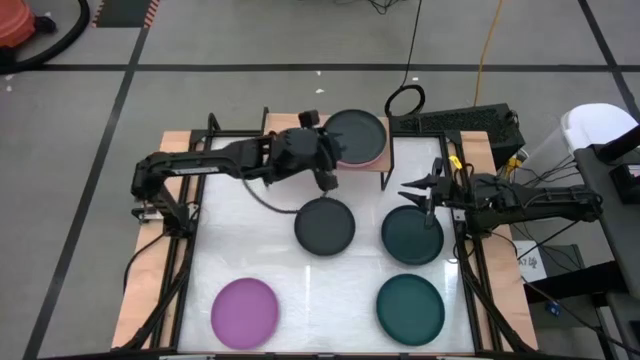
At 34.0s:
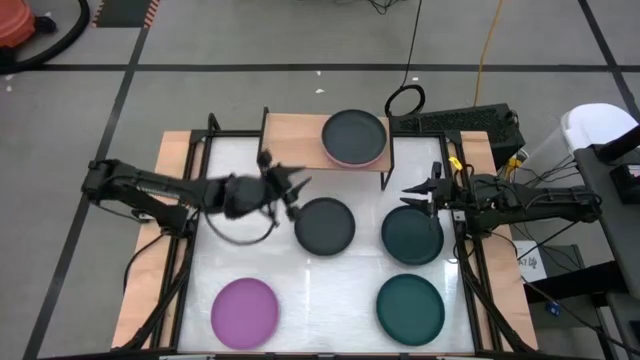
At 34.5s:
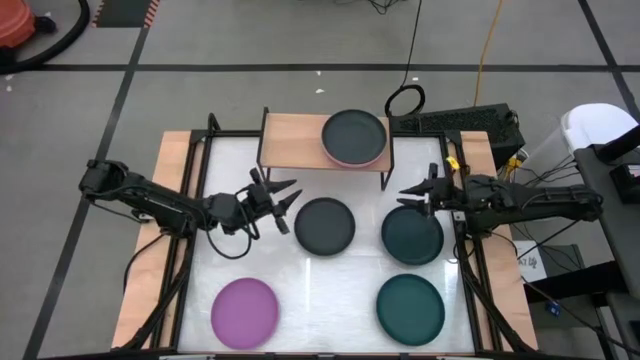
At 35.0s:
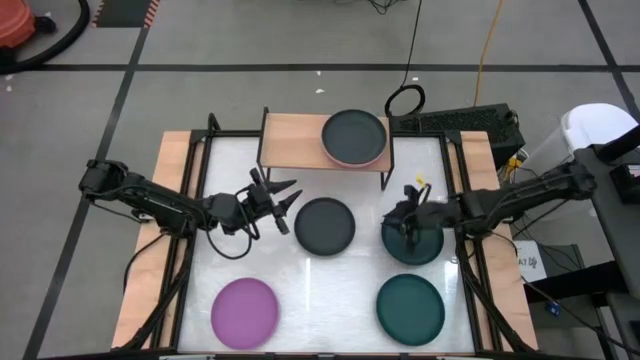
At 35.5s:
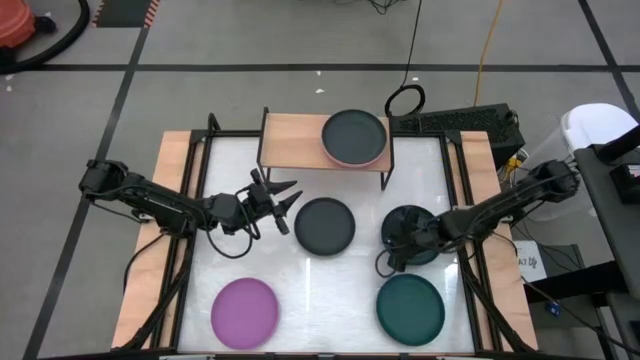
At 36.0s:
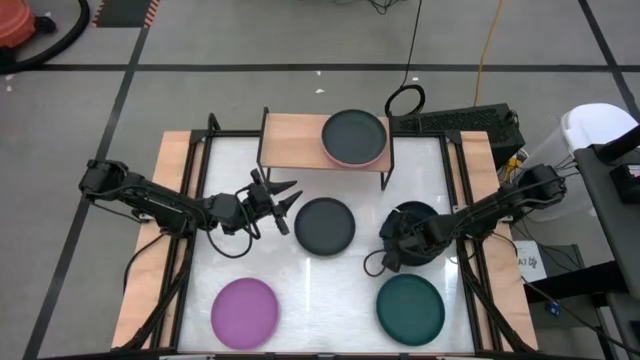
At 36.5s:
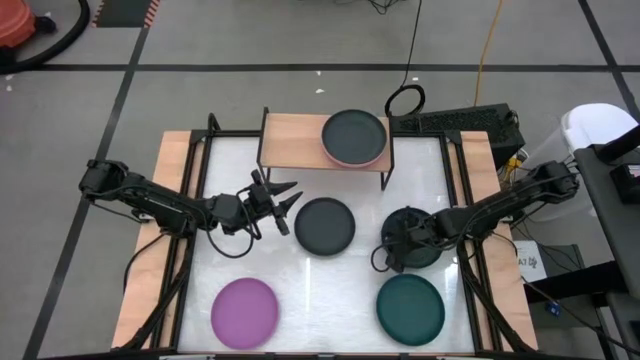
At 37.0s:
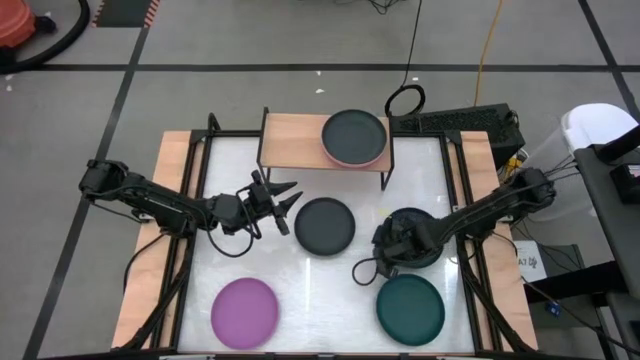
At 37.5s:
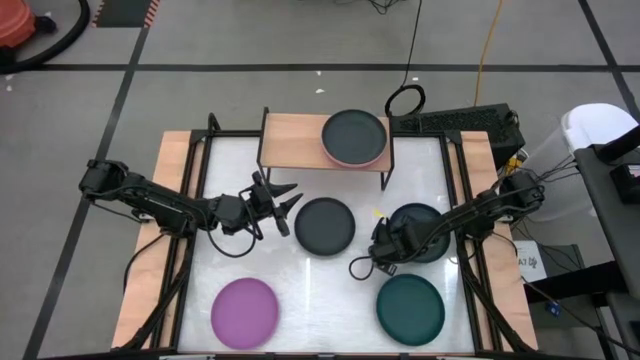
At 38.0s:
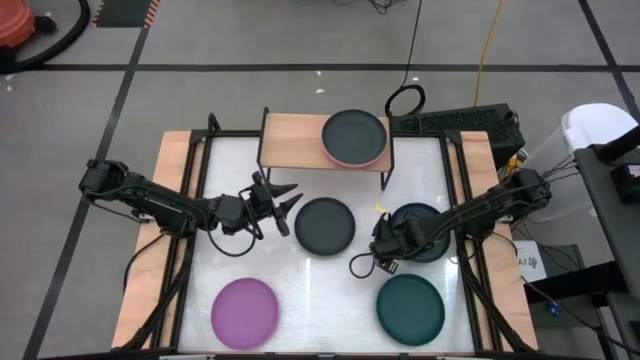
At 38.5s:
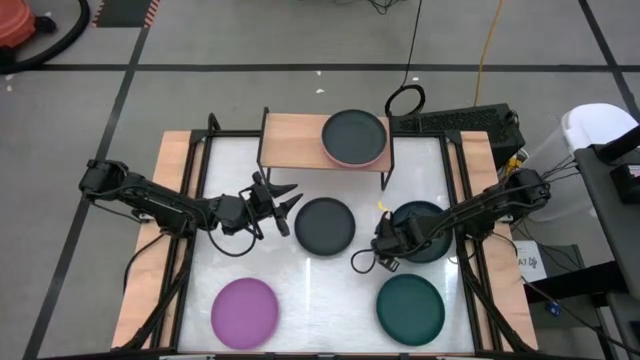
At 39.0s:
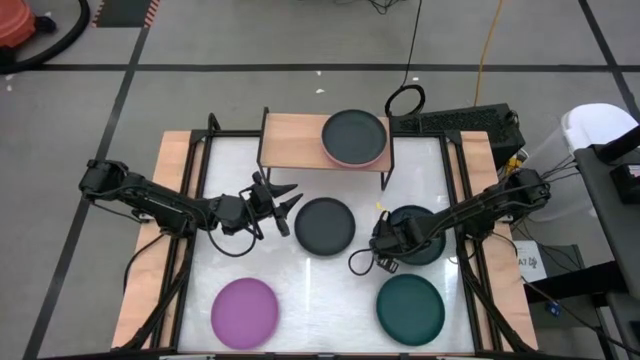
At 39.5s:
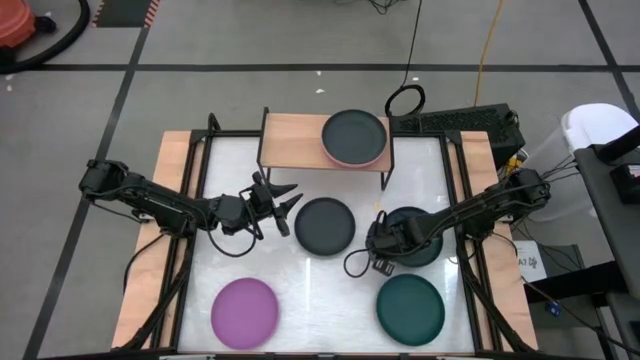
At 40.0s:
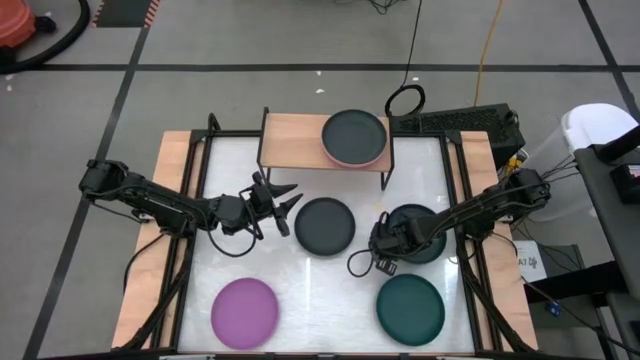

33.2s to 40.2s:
Task: Place and stack plates onto a shelf
Put the top dark green plate on the shelf

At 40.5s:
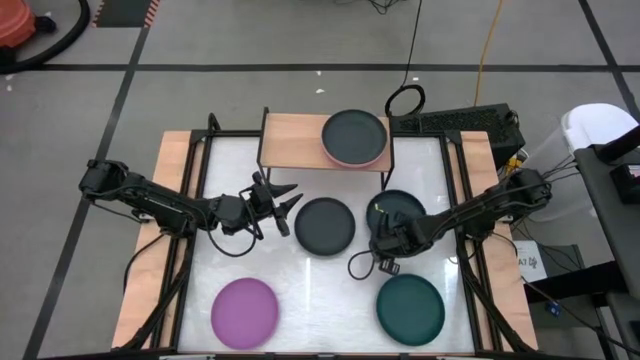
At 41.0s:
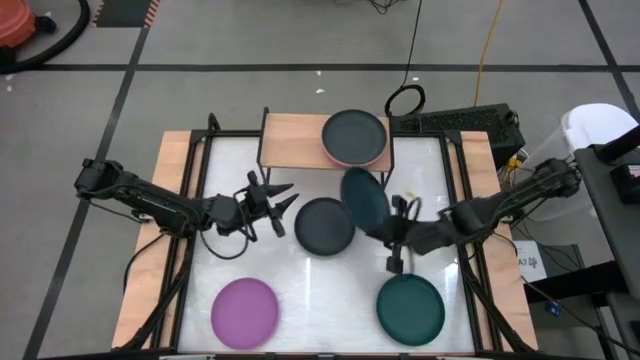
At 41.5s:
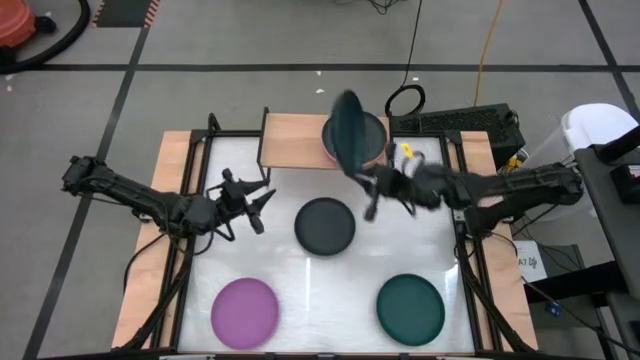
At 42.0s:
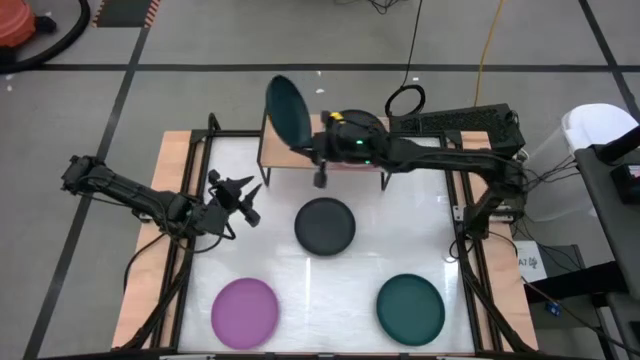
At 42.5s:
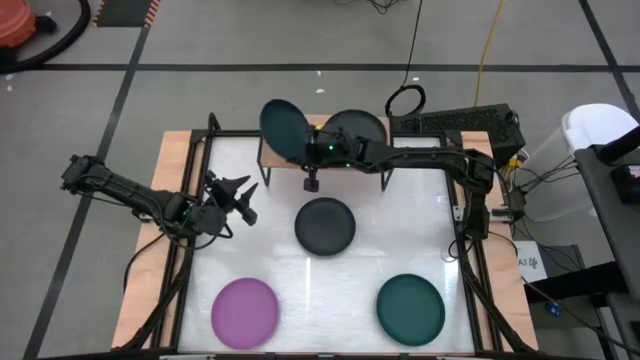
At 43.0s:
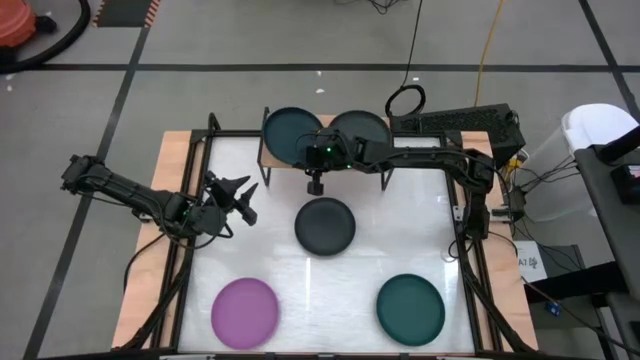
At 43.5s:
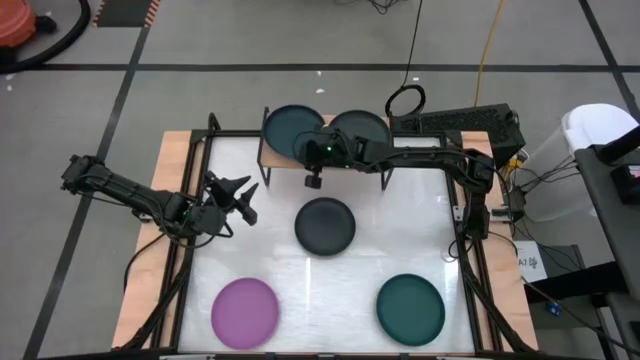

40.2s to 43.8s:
Put the top dark green plate on the shelf

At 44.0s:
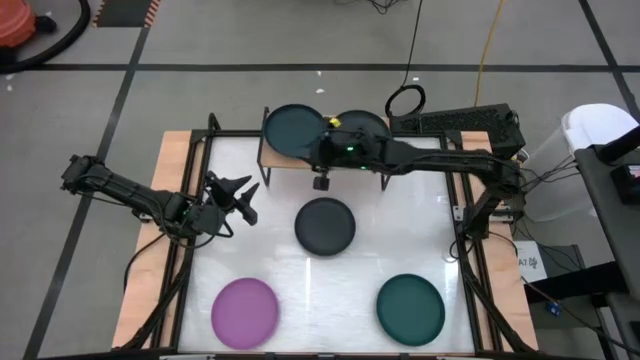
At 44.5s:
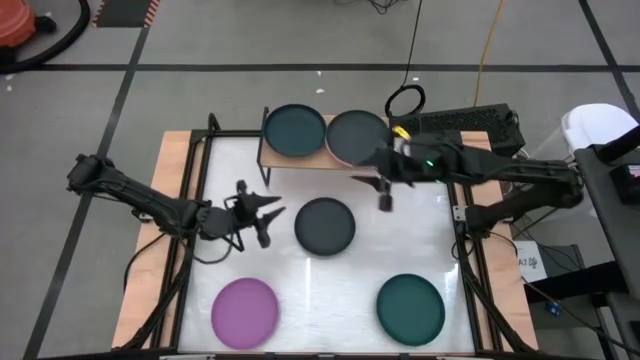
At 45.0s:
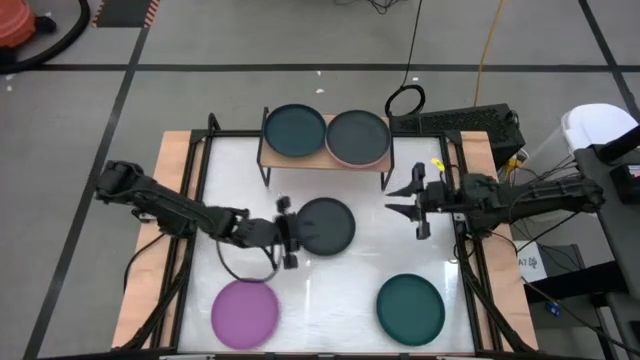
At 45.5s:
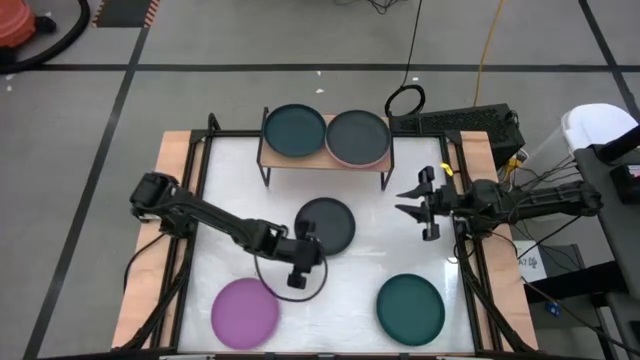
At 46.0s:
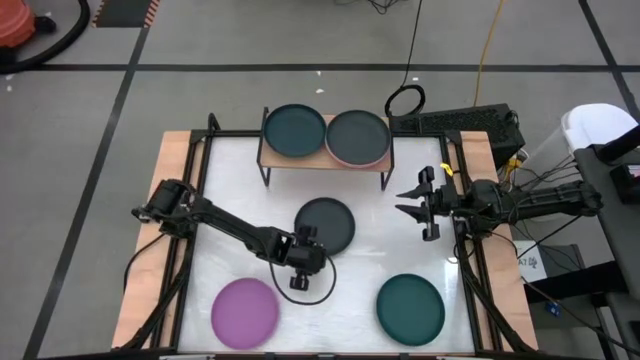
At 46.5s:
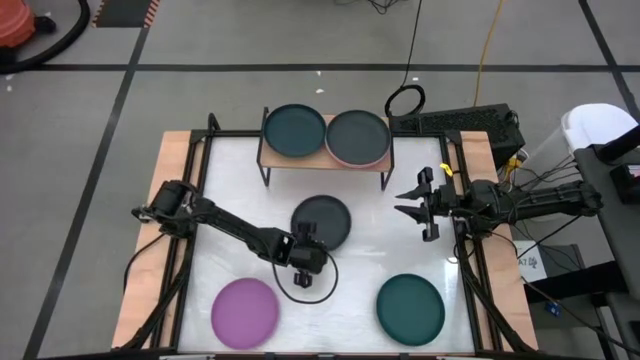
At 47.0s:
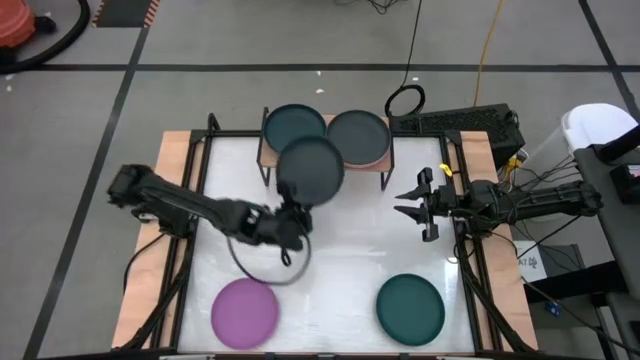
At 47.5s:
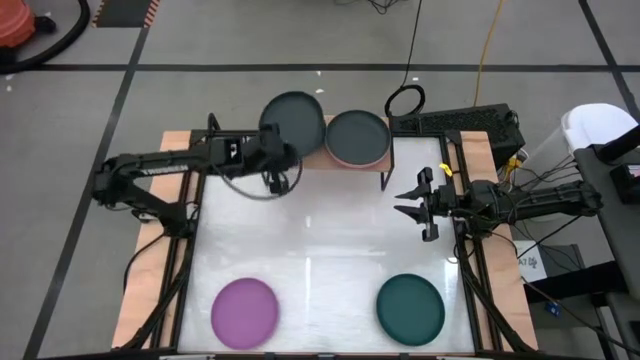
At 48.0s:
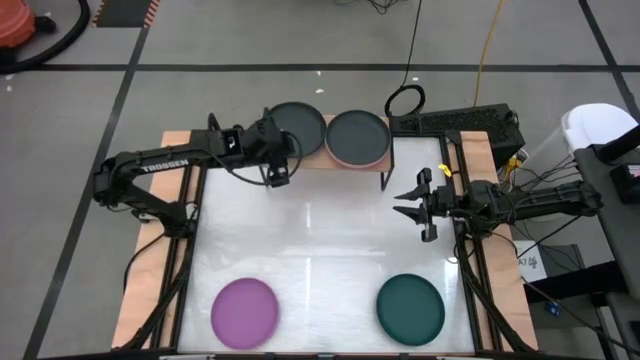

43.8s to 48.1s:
Stack the black plate on top of the dark green plate on the shelf

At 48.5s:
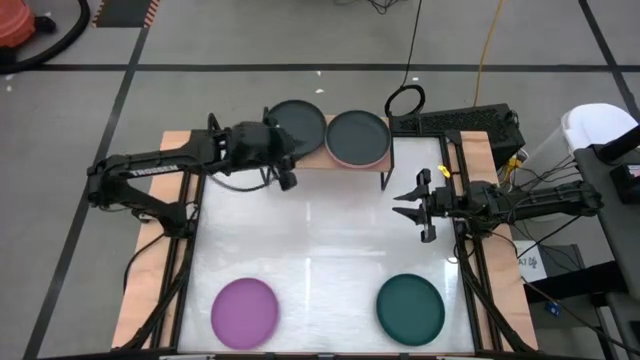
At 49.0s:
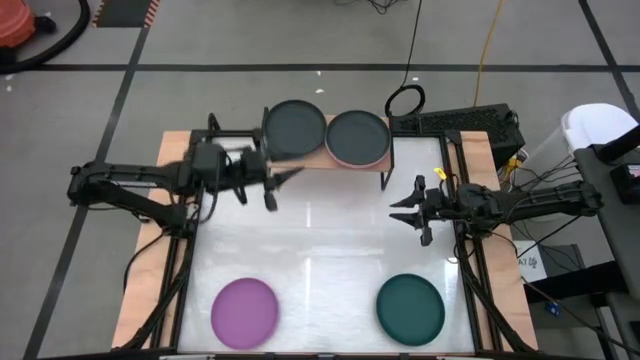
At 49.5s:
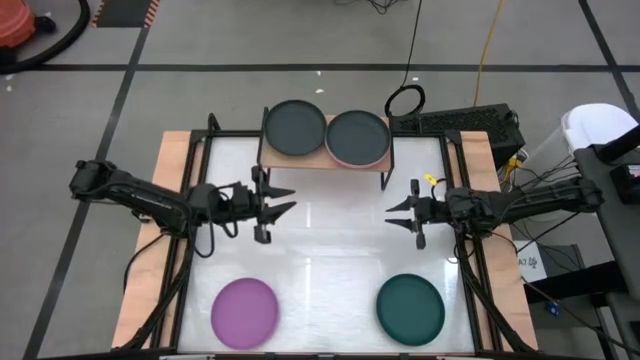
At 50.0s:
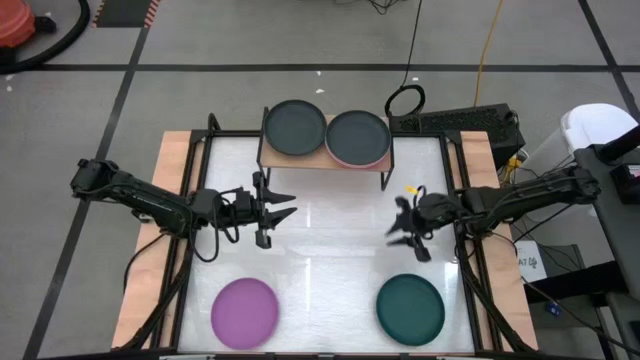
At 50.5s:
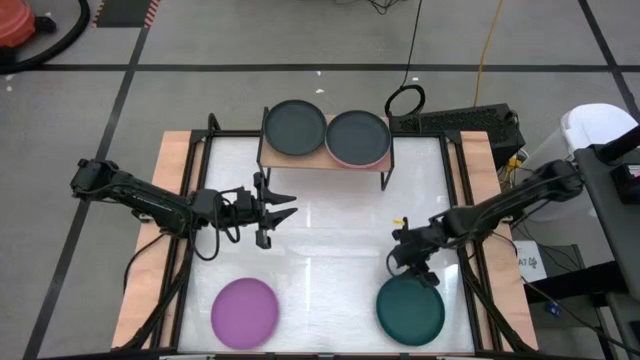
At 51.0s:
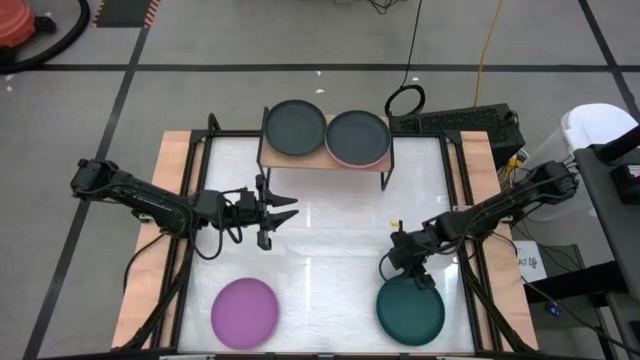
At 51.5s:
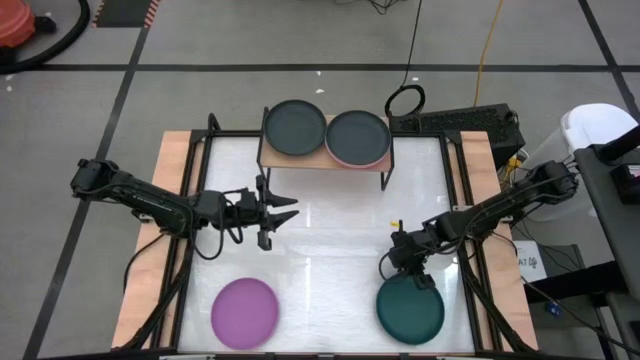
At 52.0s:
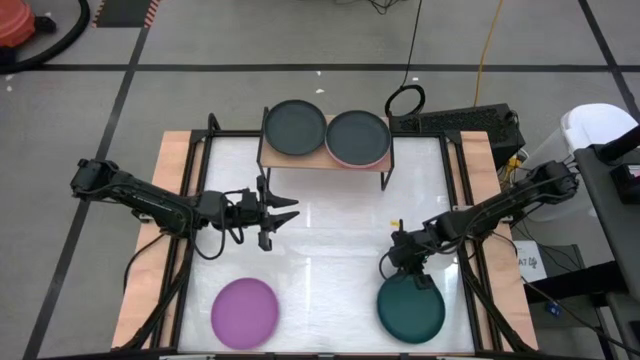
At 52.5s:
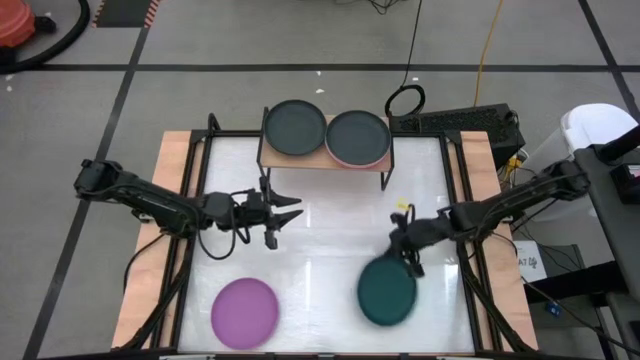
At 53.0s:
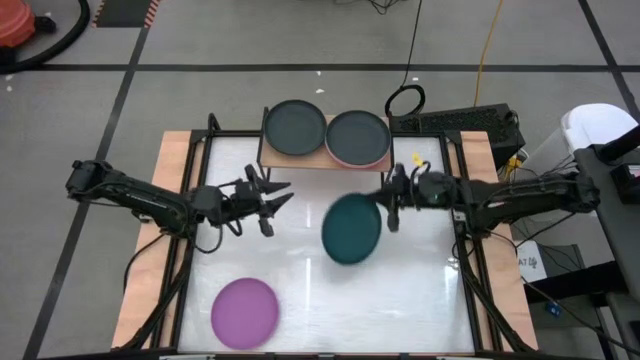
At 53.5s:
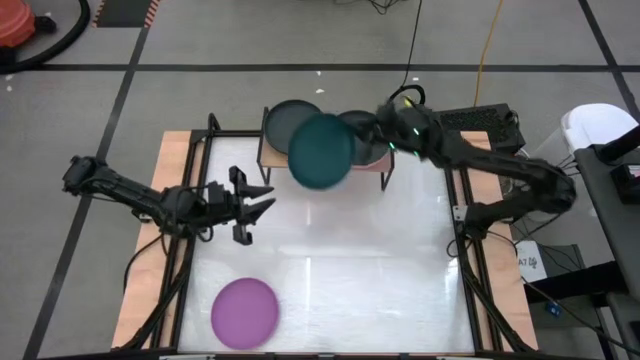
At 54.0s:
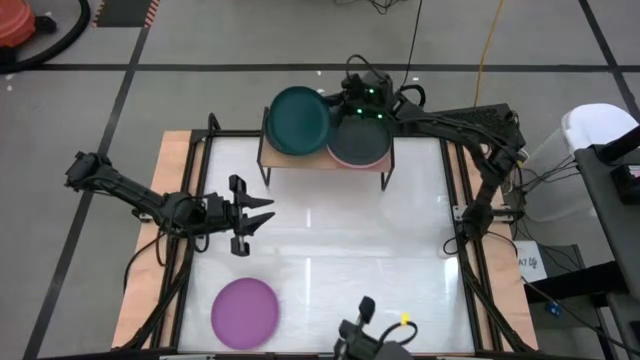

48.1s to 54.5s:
Stack the dark green plate on top of the dark green plate on the shelf
